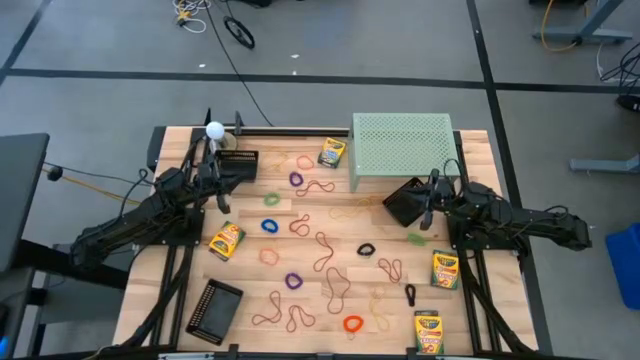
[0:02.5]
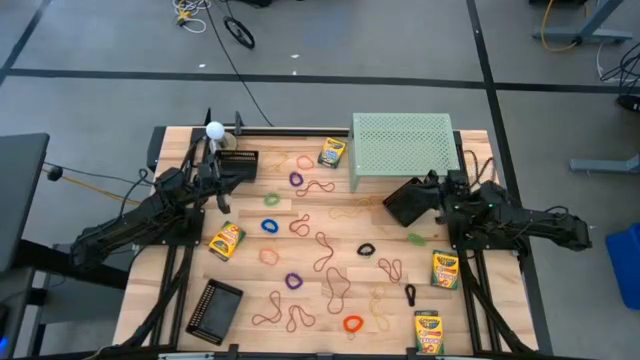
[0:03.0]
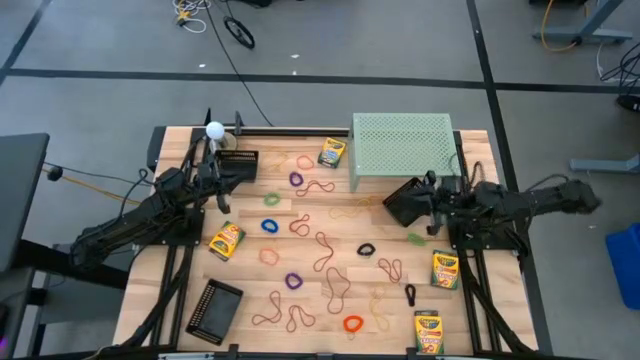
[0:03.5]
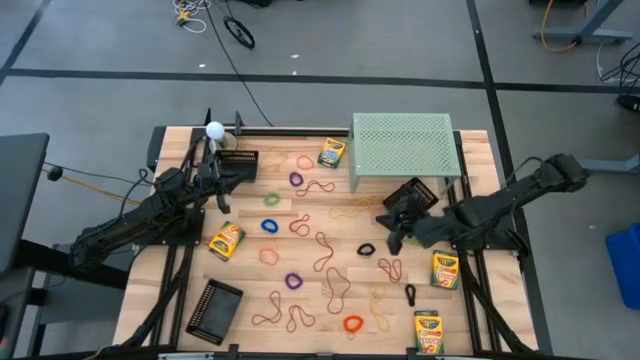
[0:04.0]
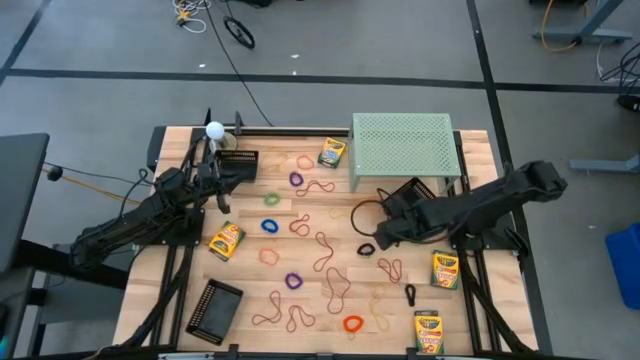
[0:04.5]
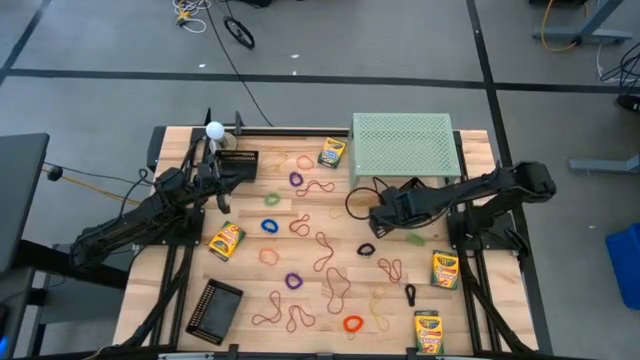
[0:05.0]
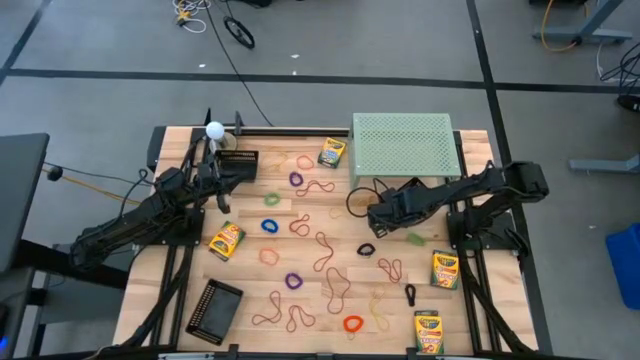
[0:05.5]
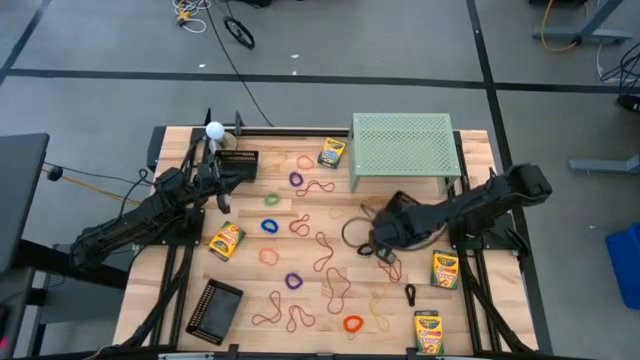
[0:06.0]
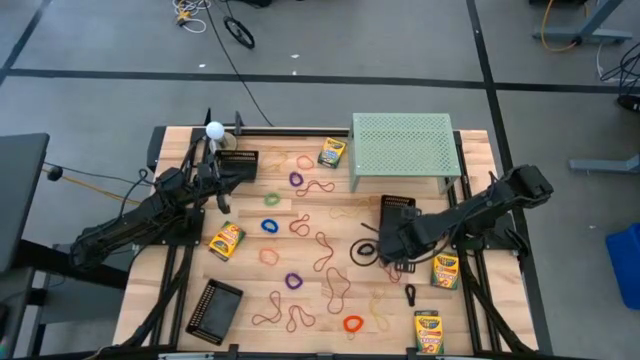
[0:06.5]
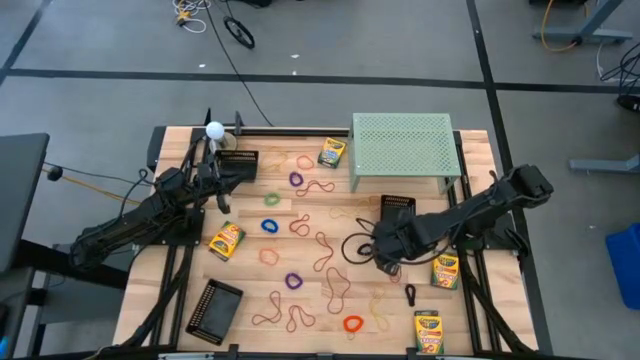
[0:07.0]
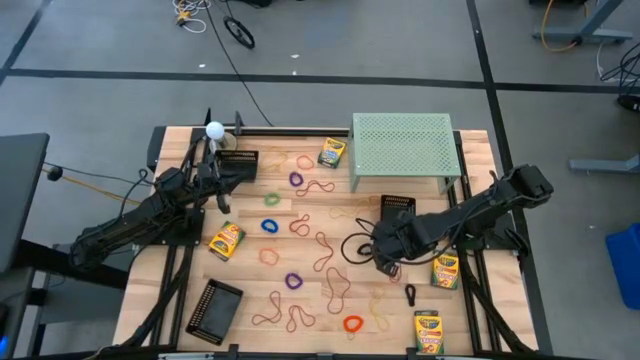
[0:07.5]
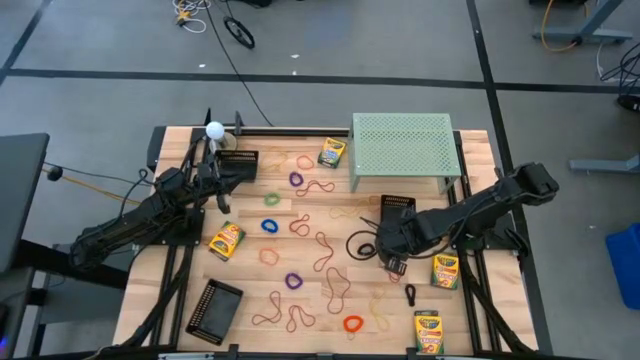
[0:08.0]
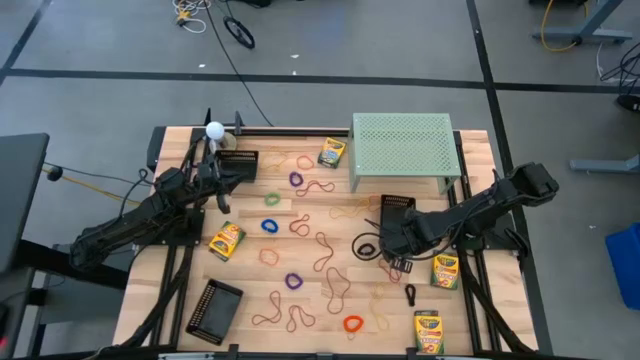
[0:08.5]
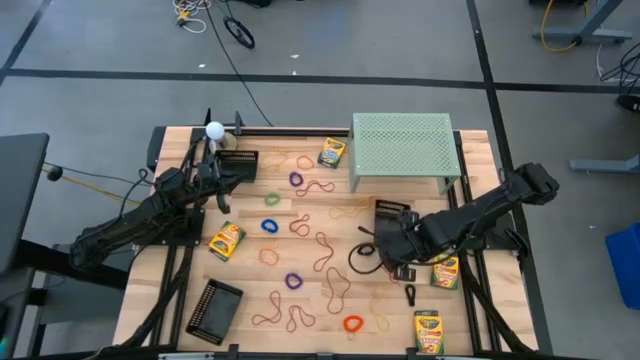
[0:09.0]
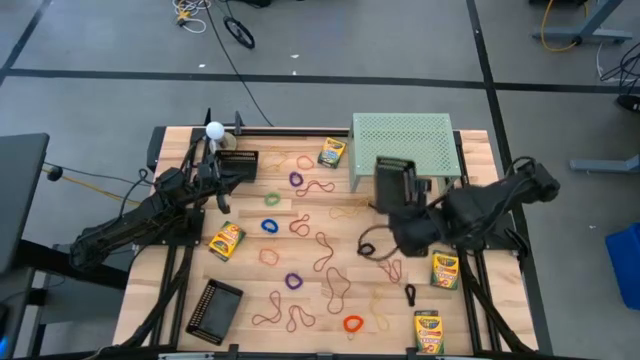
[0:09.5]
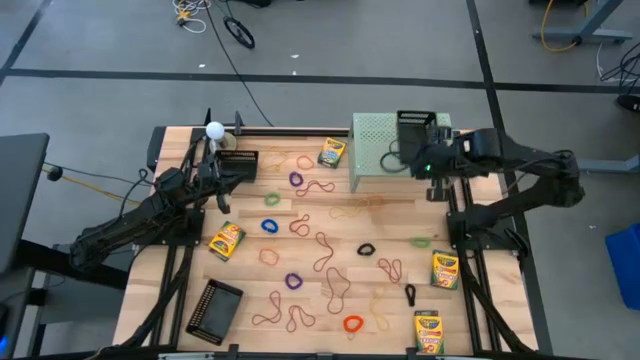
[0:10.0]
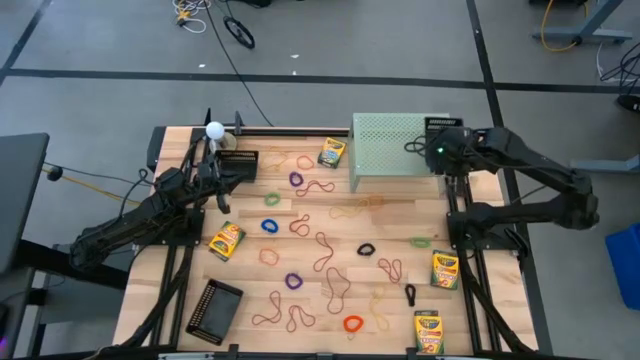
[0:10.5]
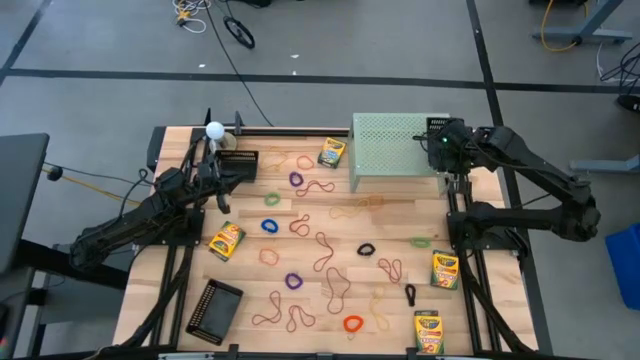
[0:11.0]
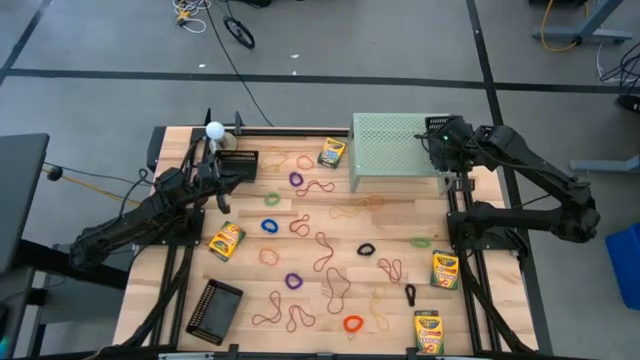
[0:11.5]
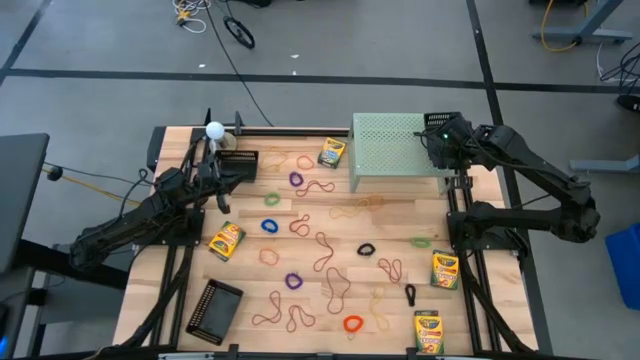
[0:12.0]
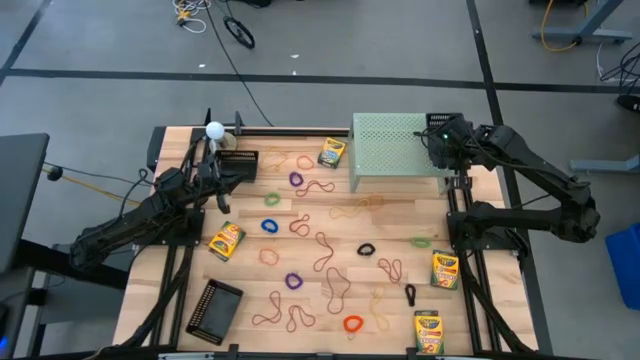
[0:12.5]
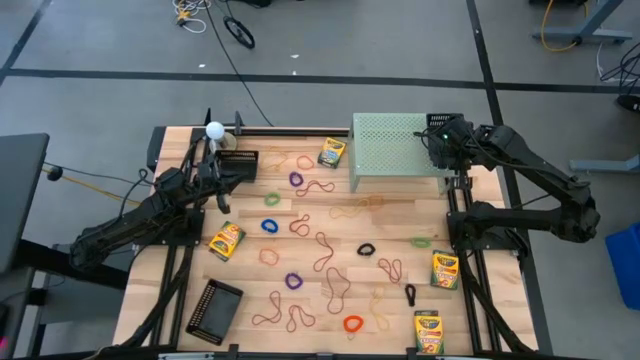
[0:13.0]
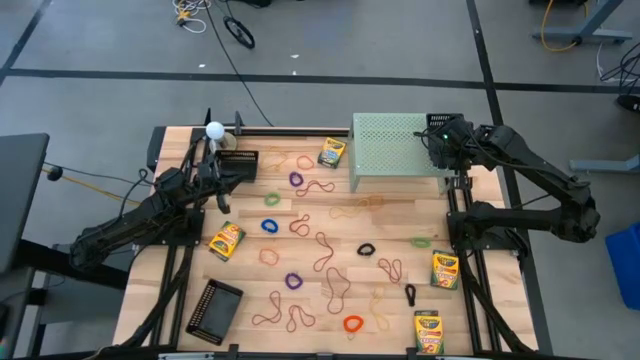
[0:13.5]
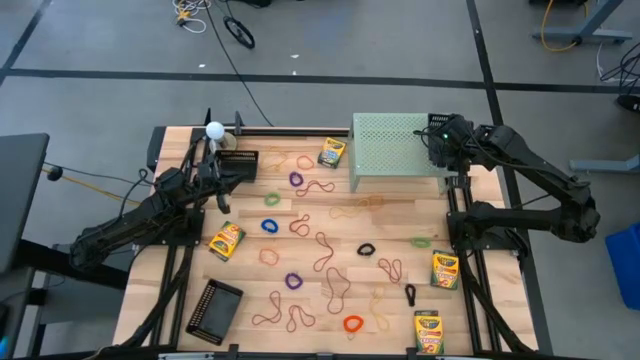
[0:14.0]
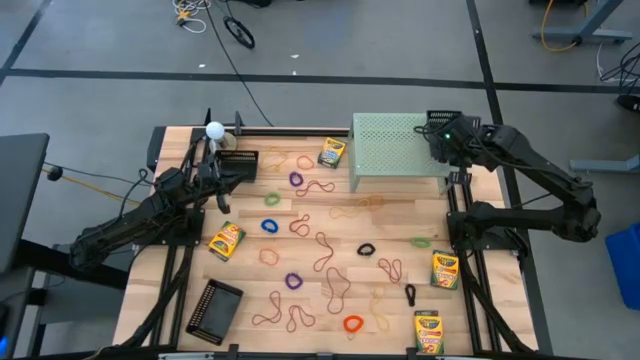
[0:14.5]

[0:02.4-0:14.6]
Task: Pick & Place Office Desk Supplies
Put the top right black basket on the shelf

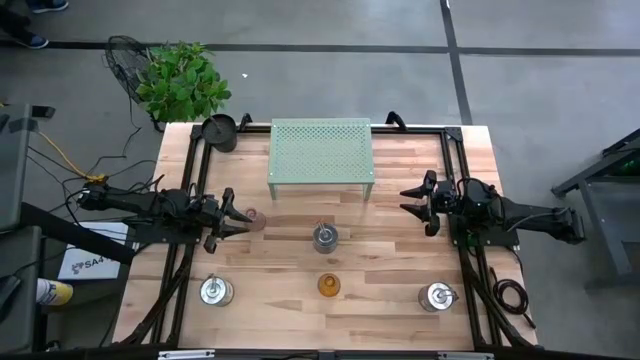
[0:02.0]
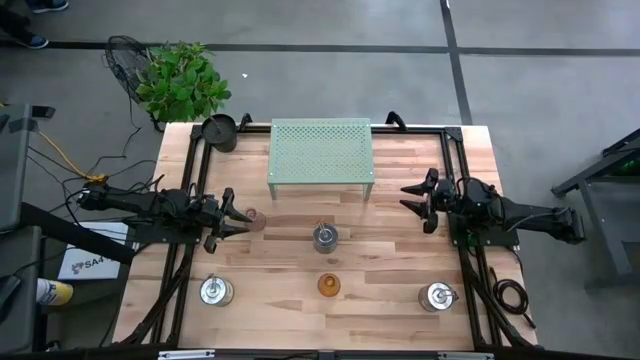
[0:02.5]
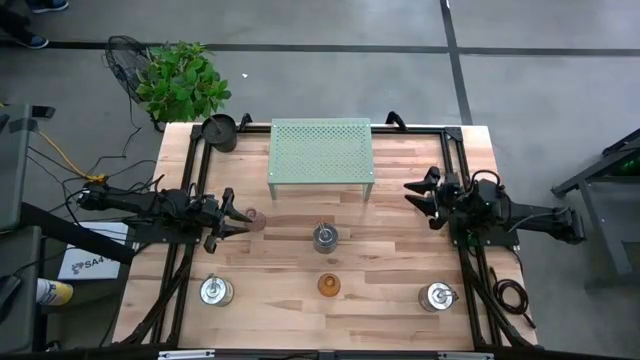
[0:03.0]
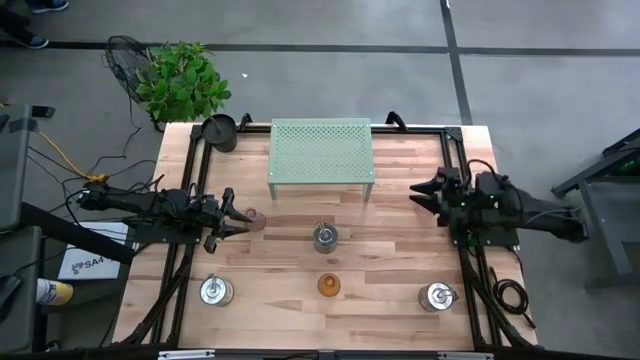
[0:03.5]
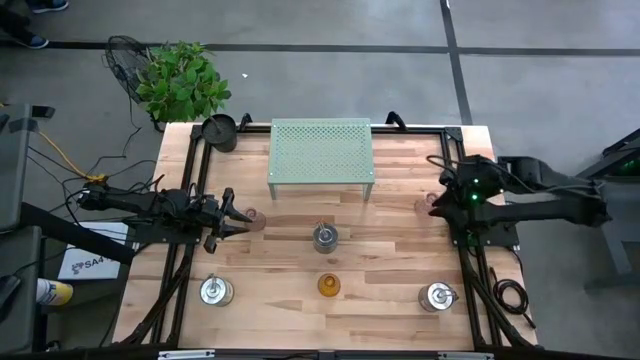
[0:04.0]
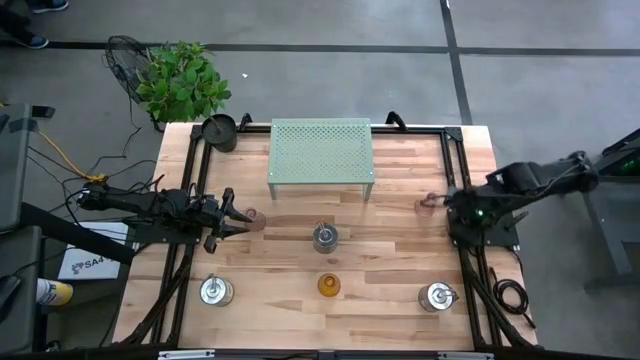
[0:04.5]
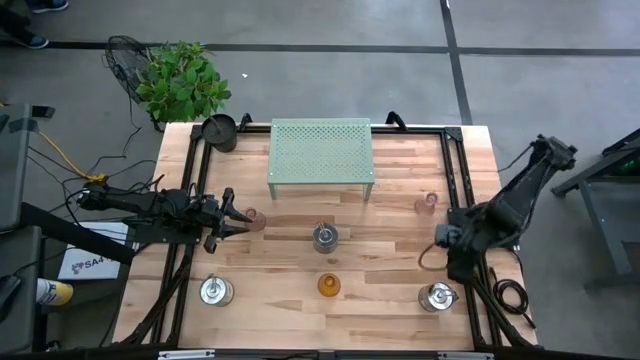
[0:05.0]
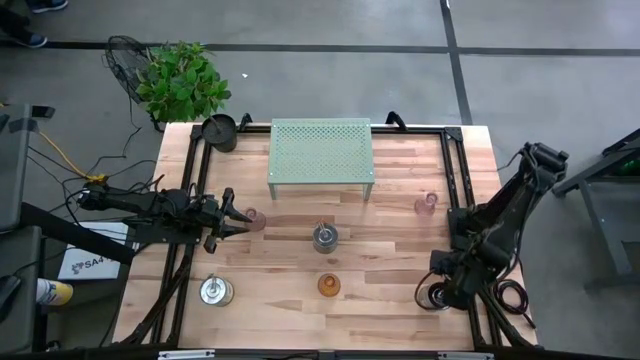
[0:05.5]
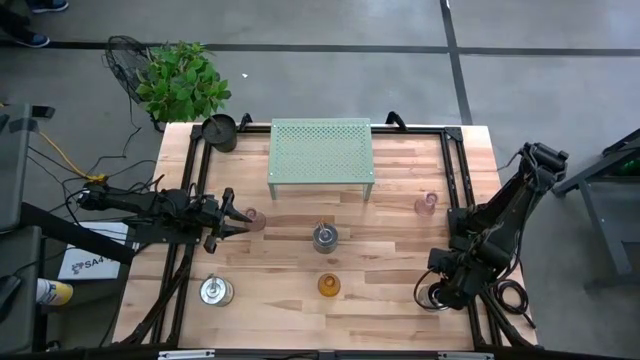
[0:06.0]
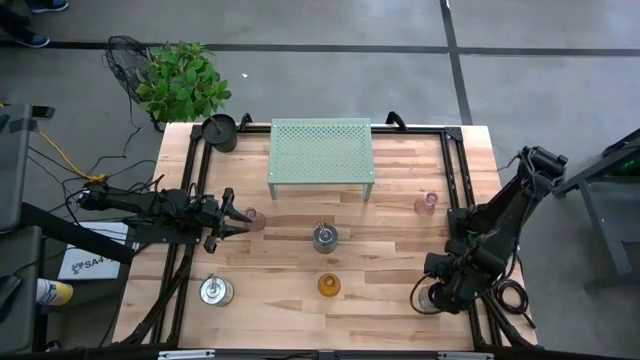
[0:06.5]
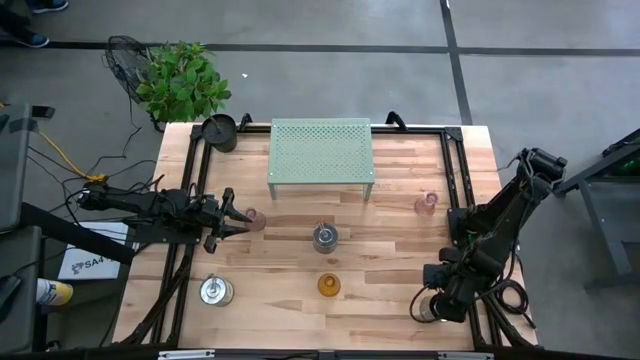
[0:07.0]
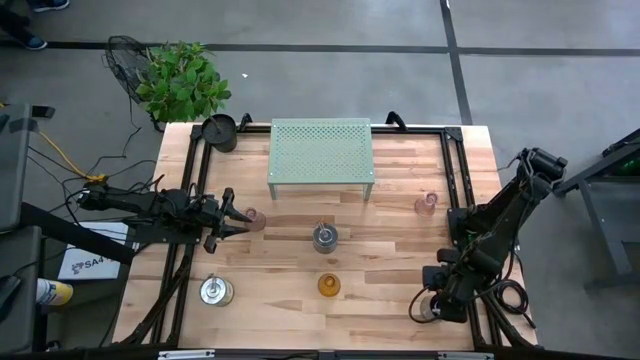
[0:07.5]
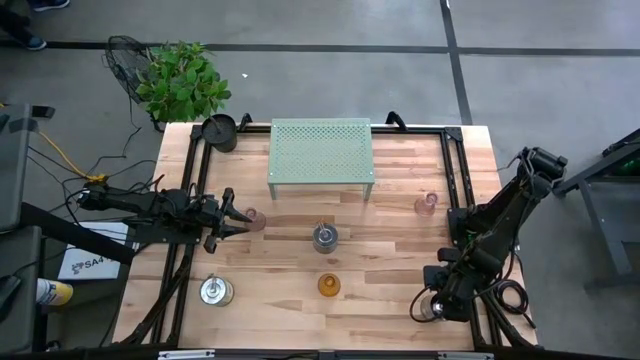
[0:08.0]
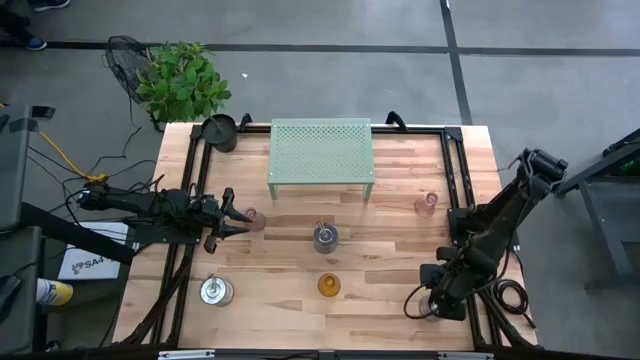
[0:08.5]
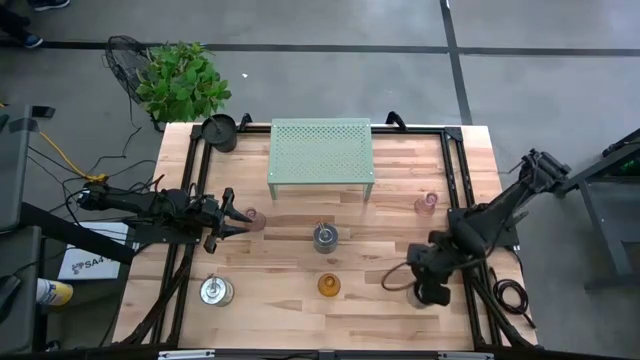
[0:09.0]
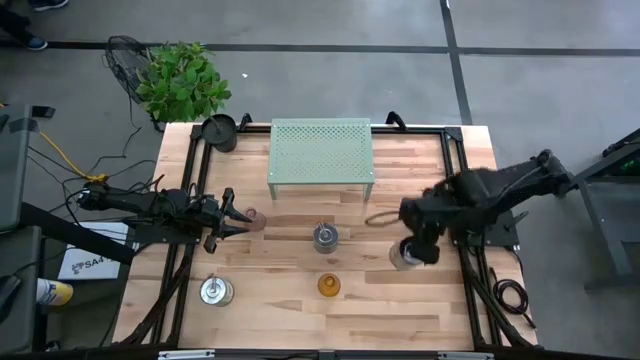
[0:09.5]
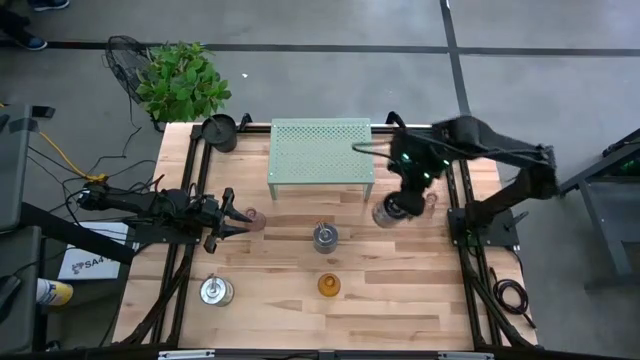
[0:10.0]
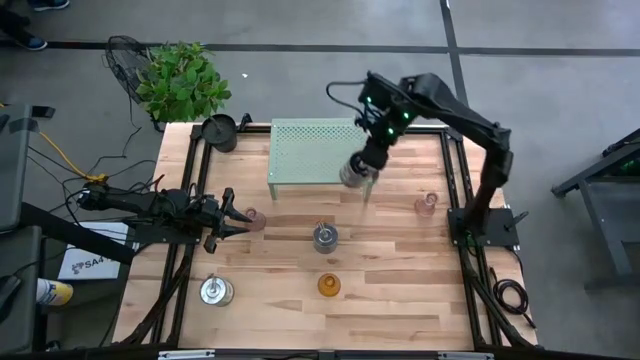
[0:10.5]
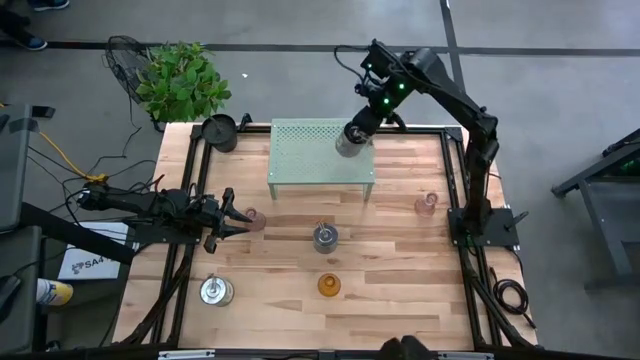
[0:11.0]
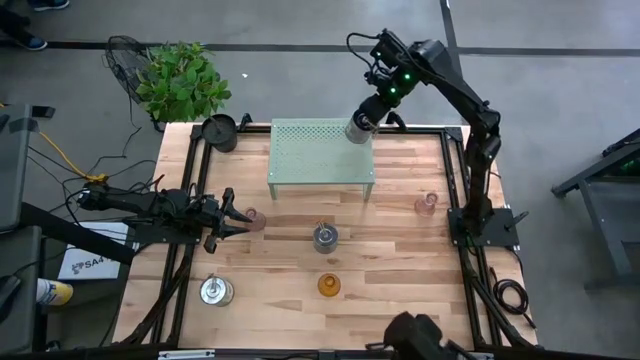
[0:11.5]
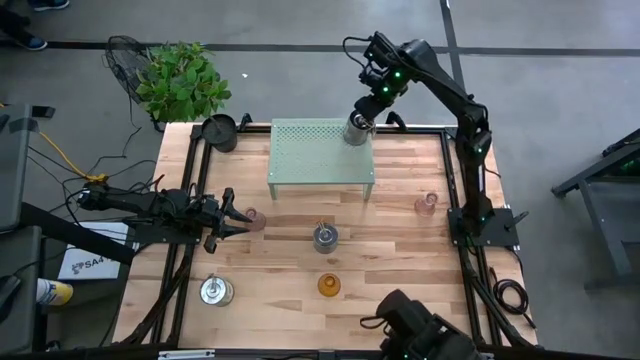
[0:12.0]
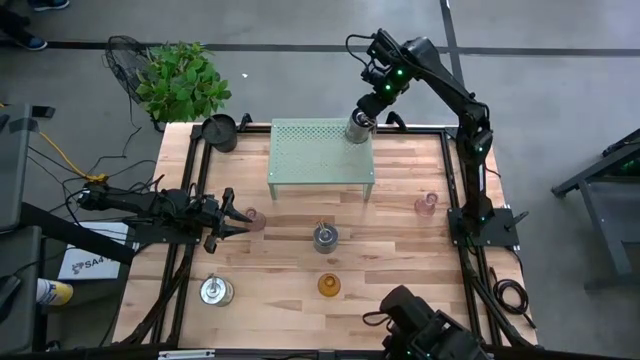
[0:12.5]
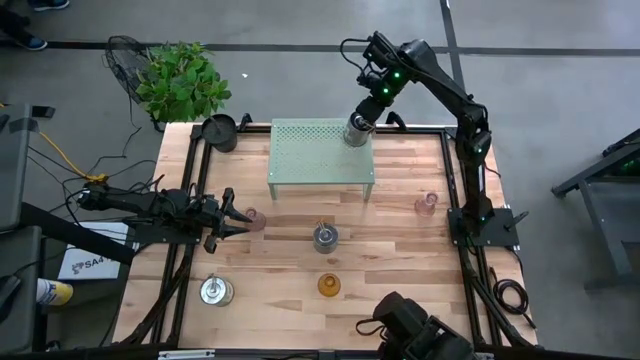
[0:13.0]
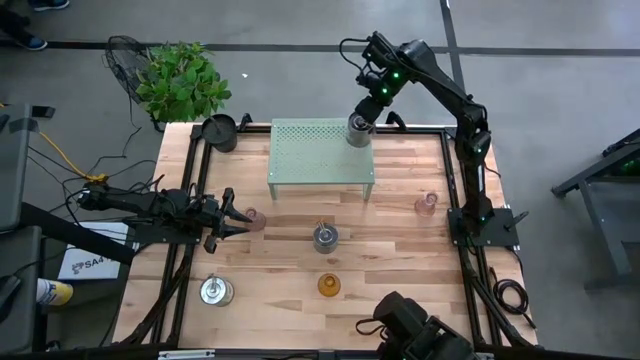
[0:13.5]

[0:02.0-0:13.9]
Task: Pick & Place candle stick holders
Put the right scented candle on the shelf
